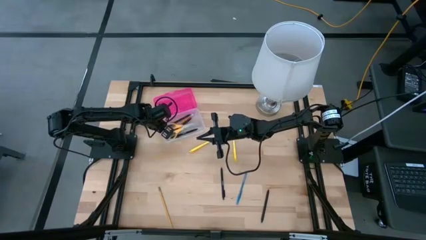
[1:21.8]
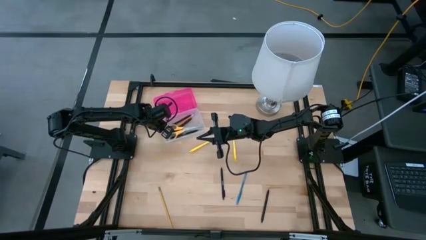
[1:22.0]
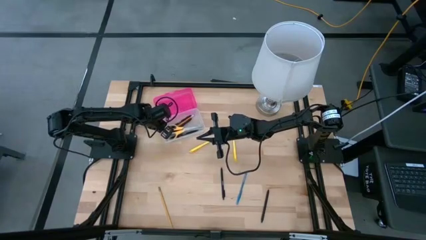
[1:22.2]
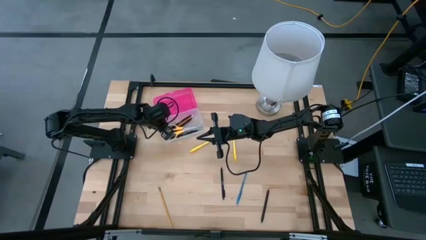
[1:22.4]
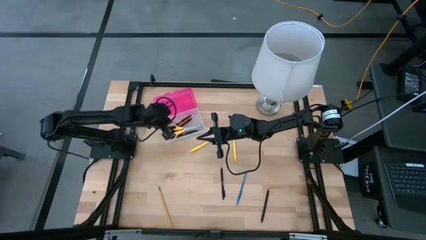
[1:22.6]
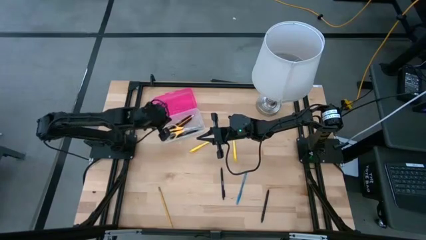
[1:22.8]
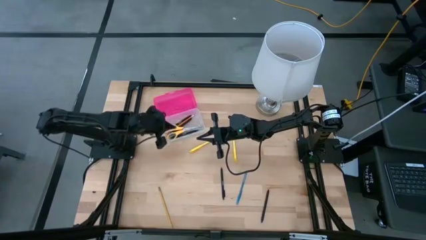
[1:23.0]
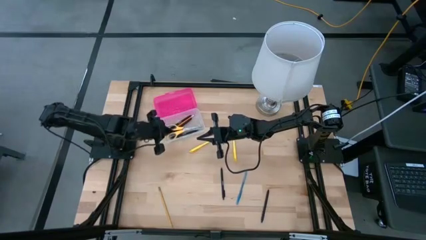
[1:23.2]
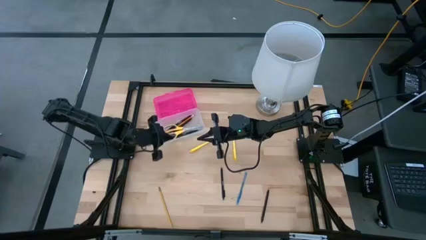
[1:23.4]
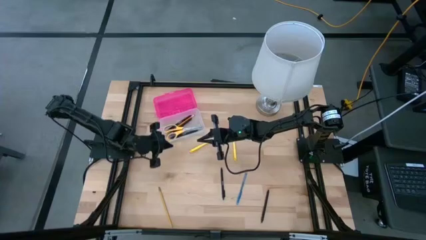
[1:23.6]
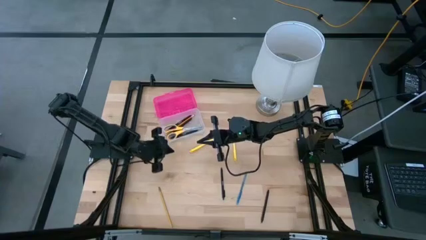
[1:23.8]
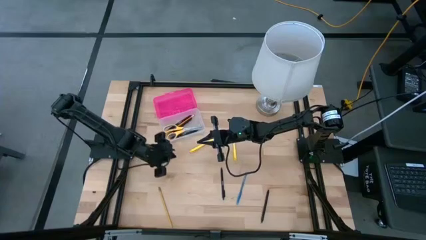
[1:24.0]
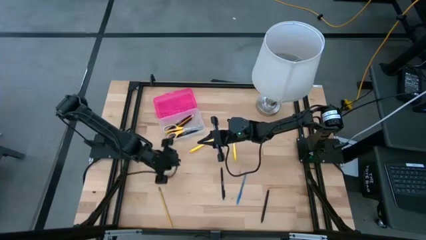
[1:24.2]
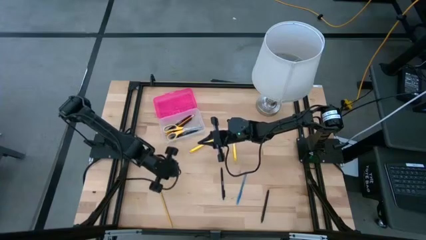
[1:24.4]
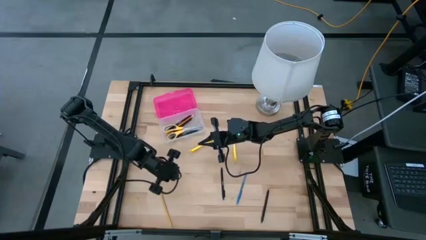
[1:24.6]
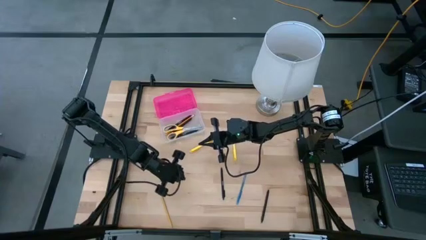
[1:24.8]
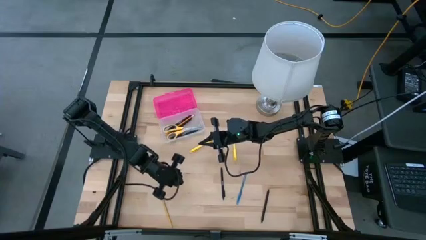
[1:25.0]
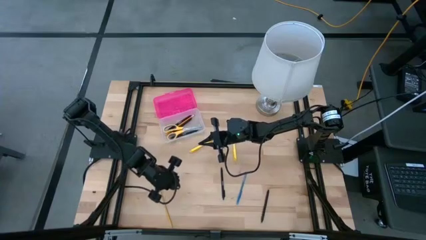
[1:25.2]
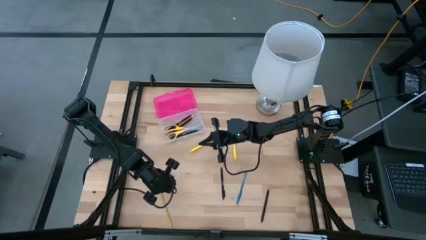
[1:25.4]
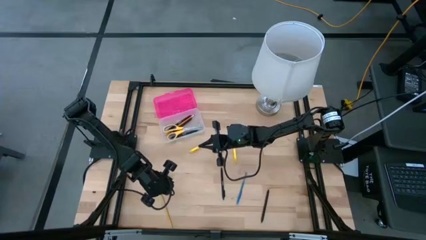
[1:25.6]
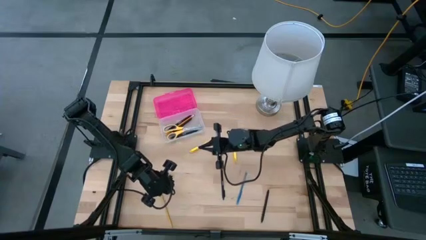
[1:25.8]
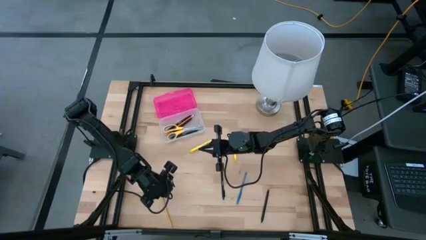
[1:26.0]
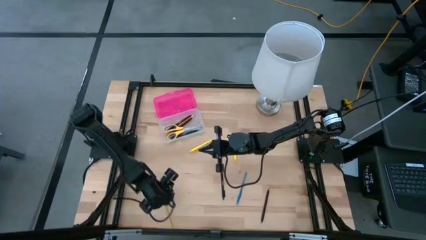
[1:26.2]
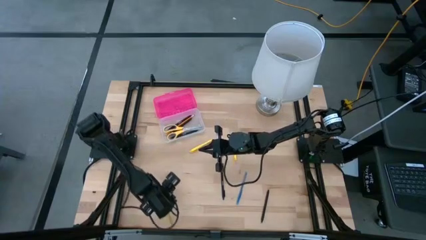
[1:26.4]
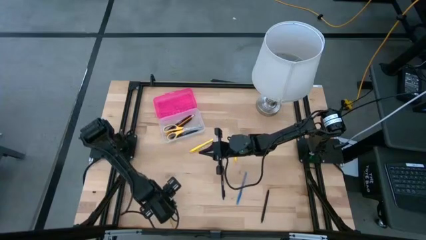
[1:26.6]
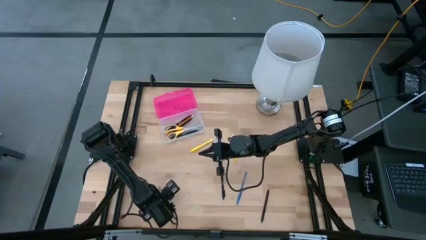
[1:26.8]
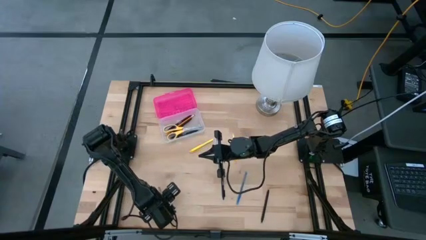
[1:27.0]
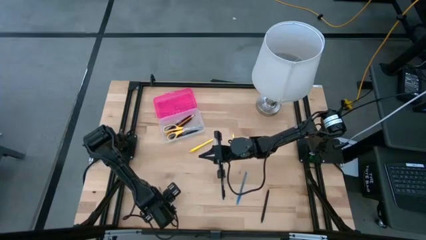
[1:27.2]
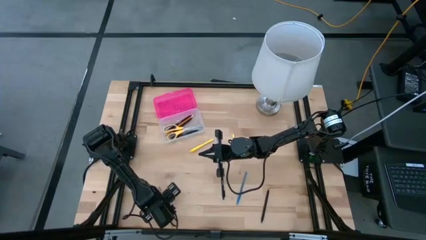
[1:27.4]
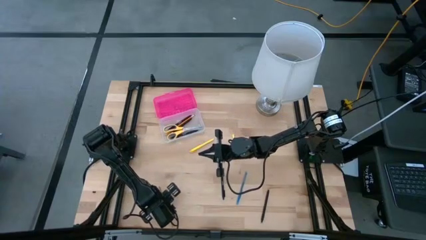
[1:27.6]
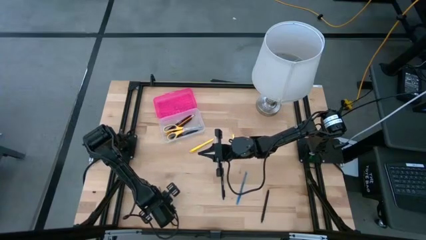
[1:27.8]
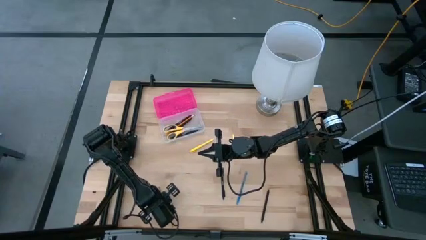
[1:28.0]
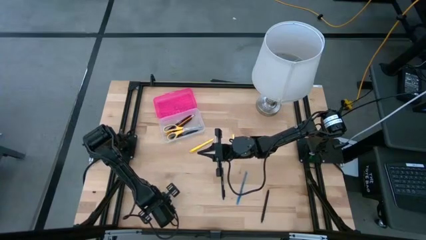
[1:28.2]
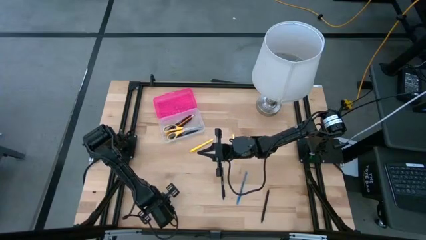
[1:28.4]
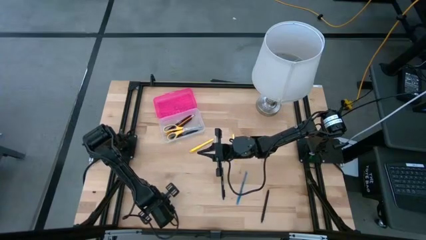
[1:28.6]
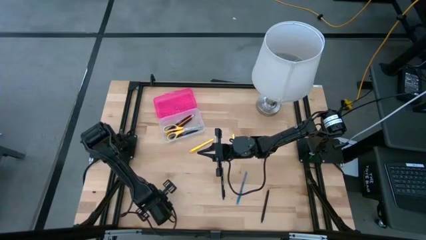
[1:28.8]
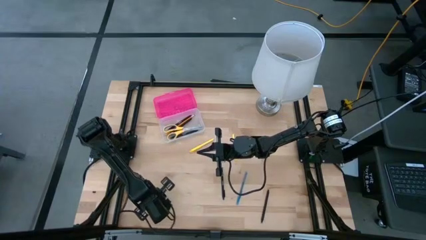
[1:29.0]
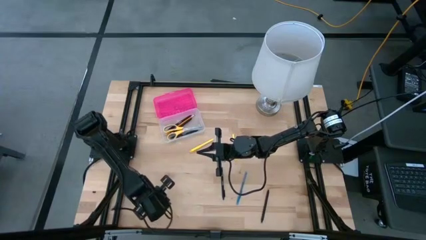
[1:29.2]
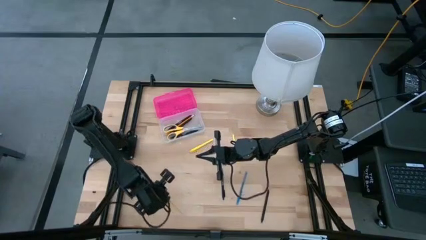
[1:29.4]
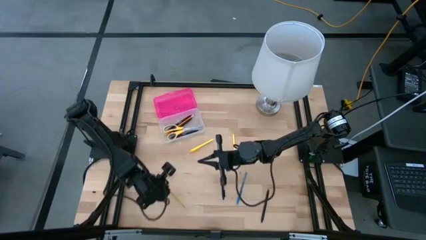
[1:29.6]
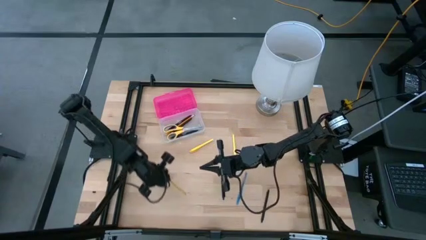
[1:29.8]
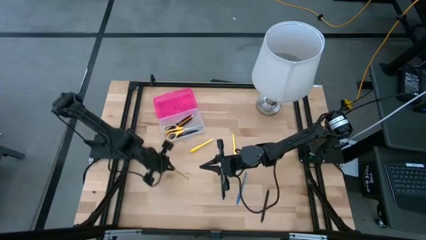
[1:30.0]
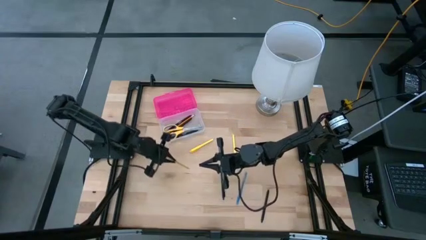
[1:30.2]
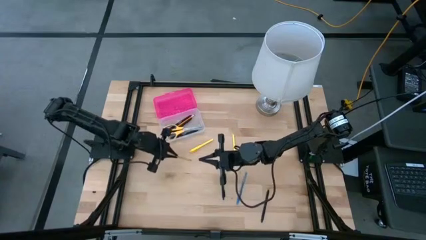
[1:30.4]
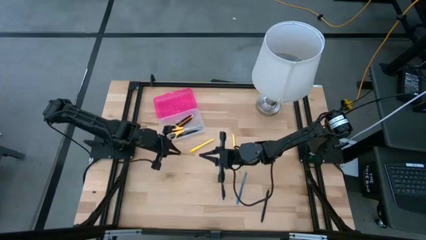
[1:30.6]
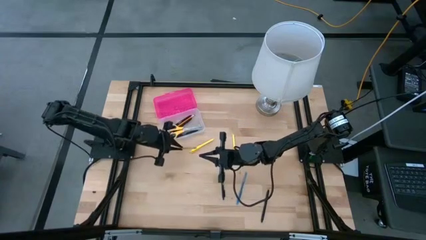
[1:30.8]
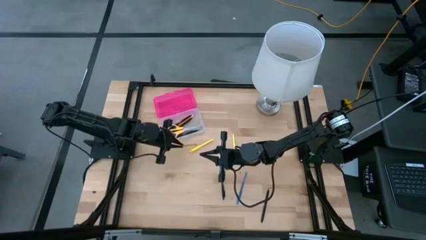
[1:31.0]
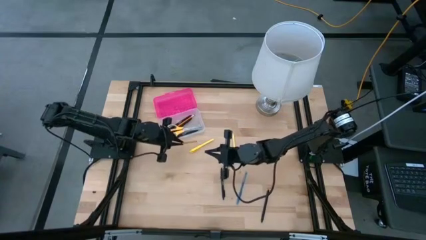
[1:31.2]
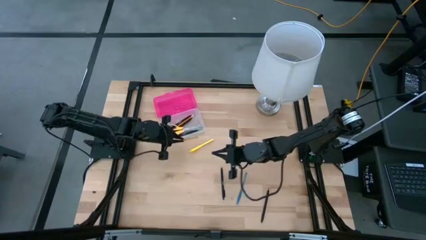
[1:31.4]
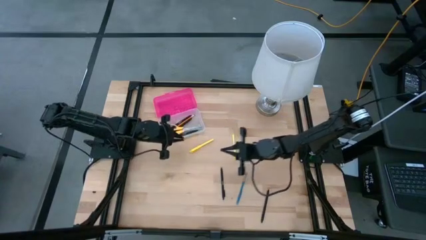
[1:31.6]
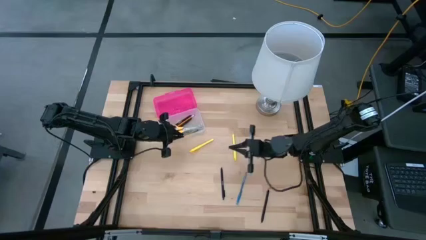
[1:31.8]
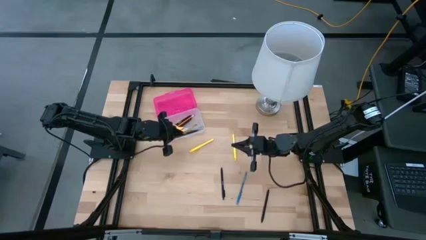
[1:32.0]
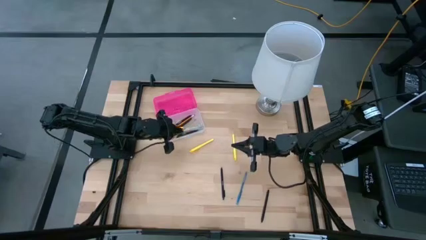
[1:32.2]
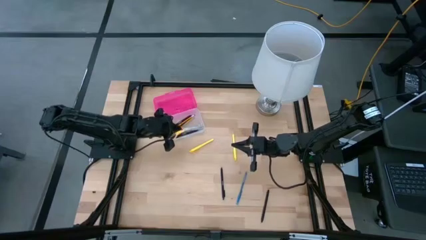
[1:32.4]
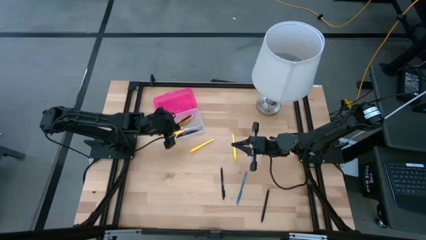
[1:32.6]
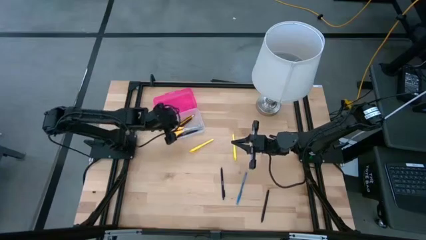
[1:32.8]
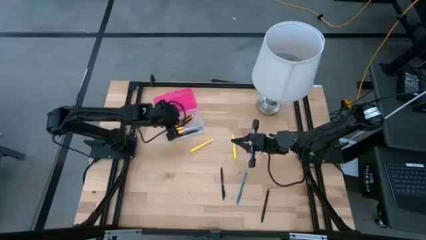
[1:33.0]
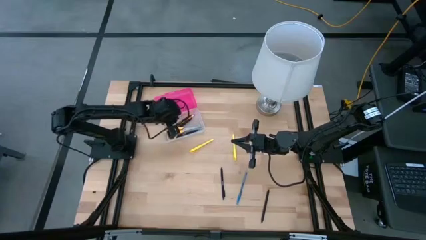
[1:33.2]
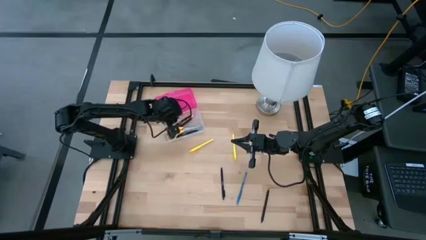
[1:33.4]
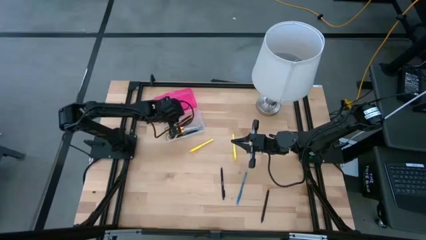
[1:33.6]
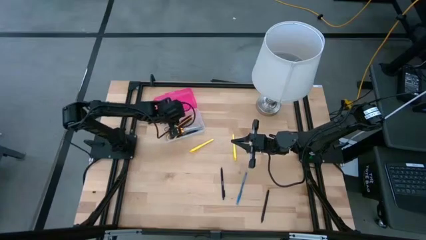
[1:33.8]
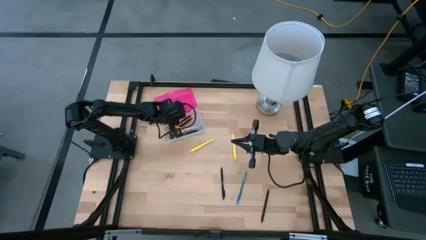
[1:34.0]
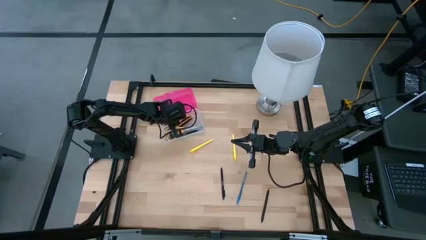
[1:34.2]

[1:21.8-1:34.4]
Task: Pick & place school supplies into a supply box
Put the yellow pencil into the pink supply box

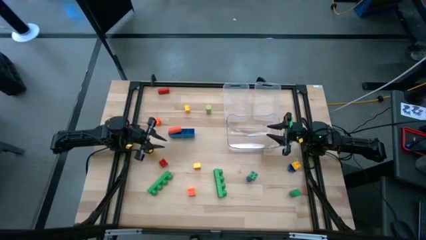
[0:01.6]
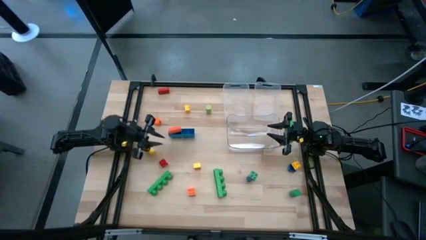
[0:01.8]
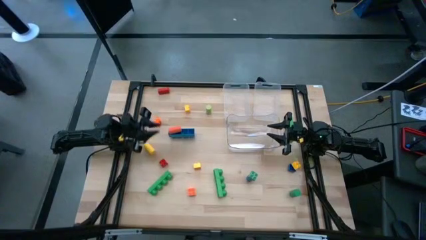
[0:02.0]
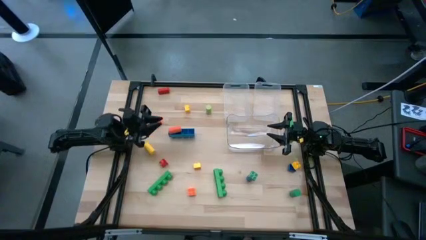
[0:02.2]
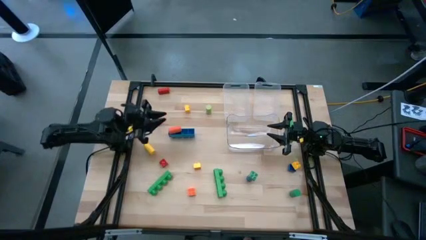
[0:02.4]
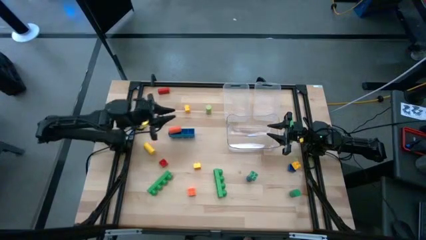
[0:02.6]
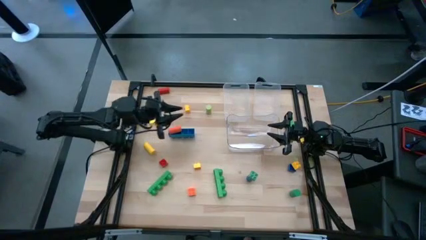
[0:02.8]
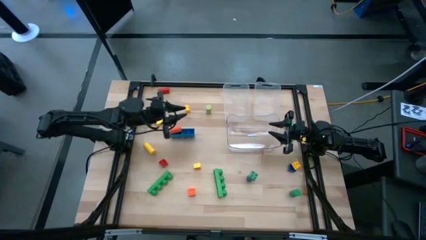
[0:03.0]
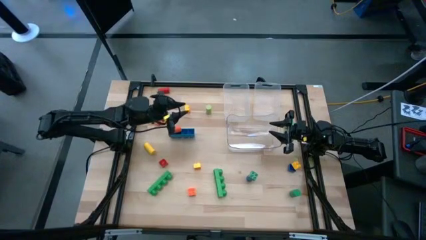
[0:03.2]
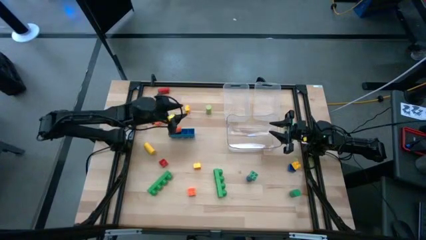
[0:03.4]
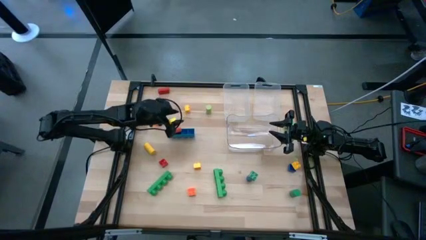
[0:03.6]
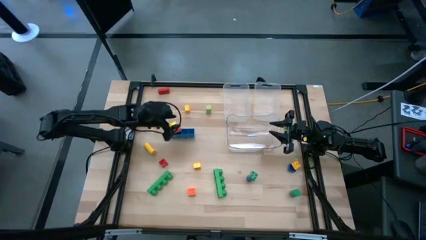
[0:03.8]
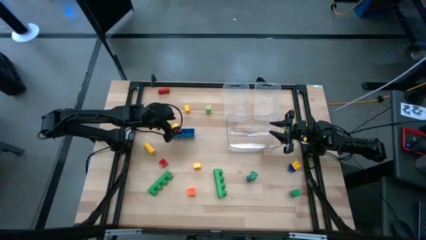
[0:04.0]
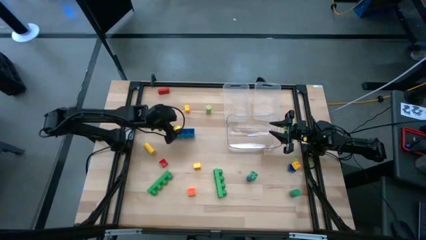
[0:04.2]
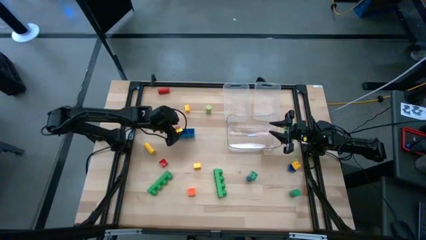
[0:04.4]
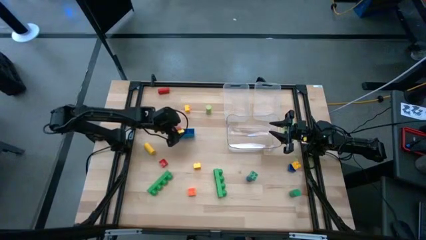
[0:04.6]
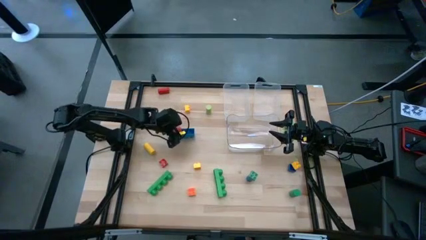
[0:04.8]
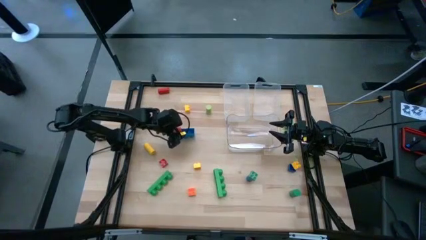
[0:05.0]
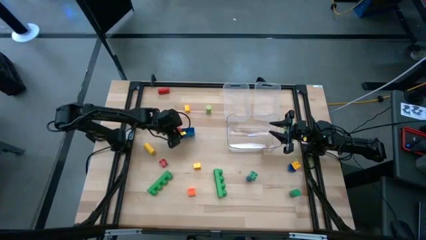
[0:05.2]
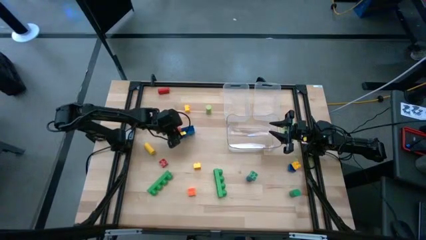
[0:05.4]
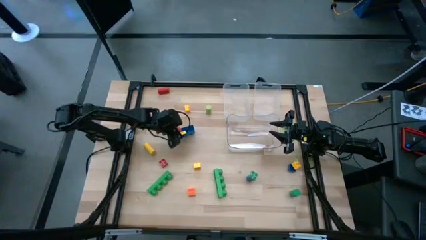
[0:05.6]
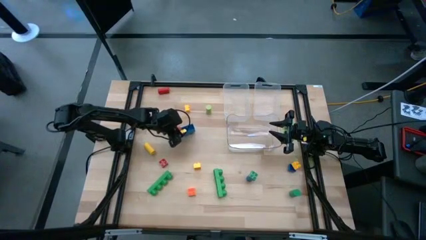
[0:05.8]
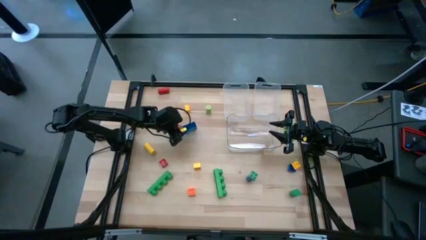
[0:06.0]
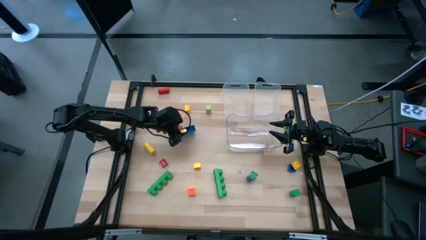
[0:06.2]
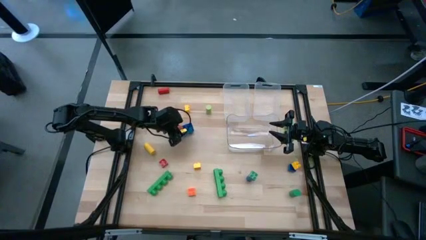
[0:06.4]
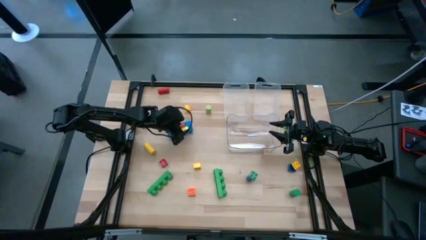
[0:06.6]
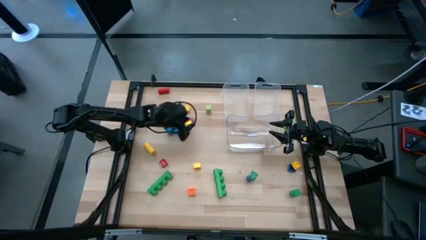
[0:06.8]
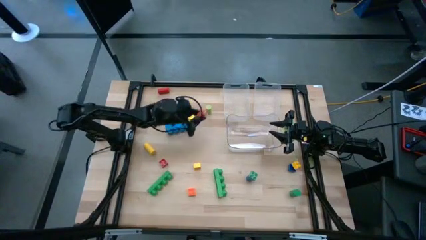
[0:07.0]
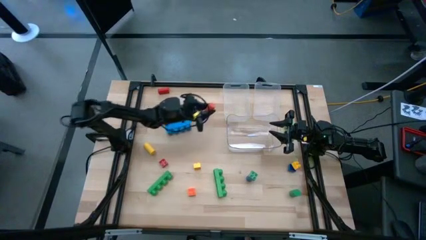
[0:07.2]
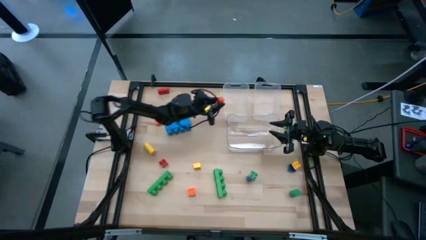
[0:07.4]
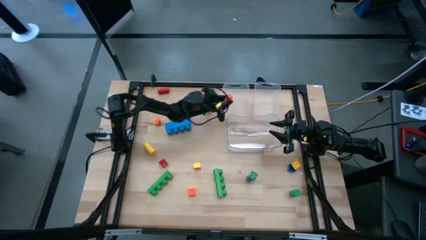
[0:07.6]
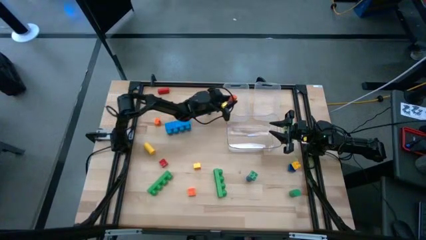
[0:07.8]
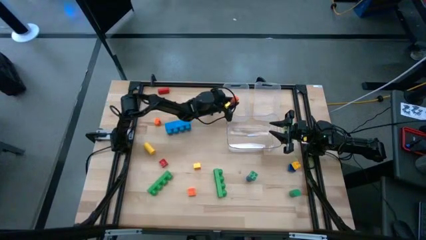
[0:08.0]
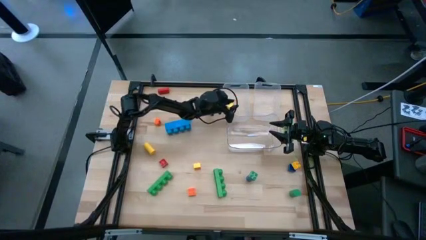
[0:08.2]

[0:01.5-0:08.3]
Task: Sort blocks by size
Put the orange cylindrical block into the left transparent bin
